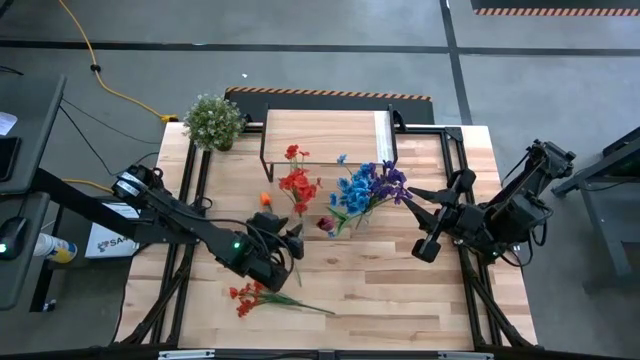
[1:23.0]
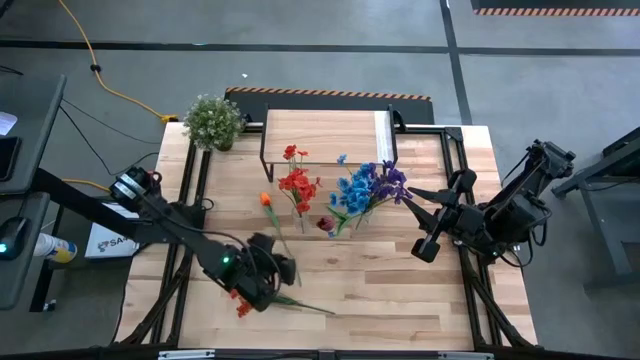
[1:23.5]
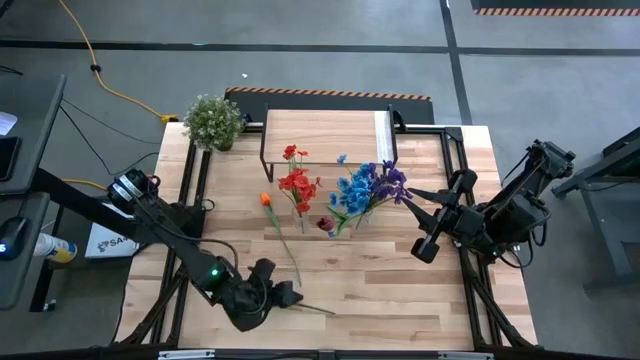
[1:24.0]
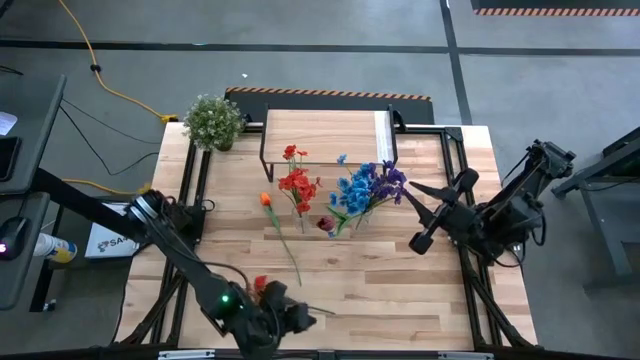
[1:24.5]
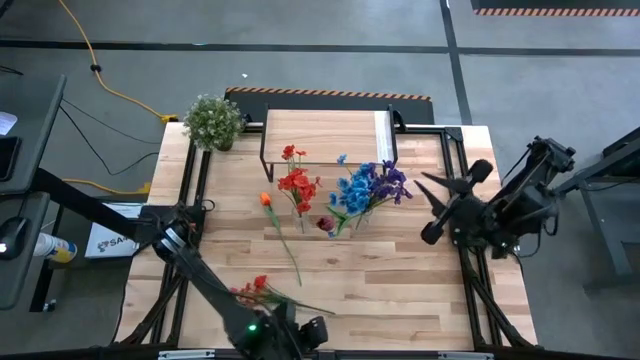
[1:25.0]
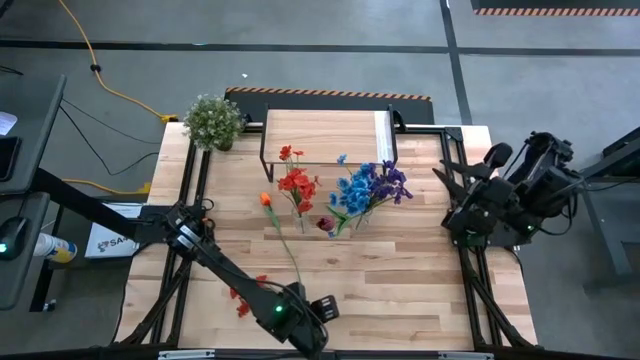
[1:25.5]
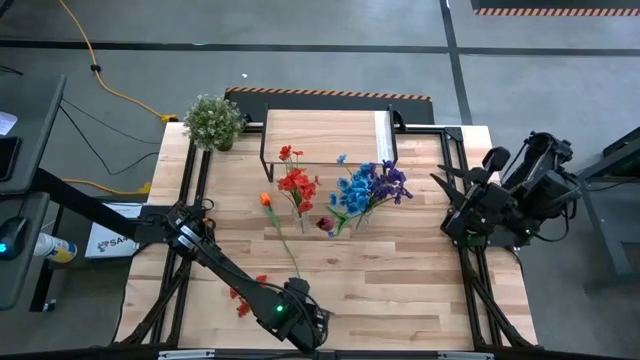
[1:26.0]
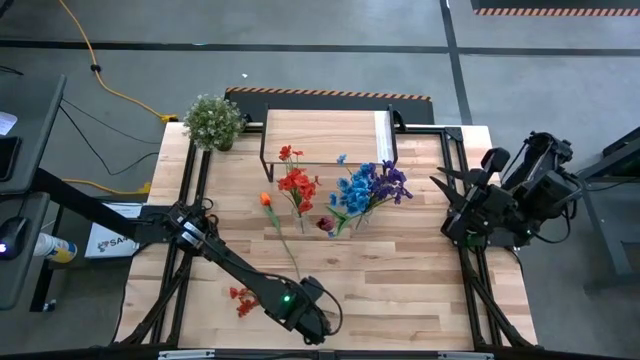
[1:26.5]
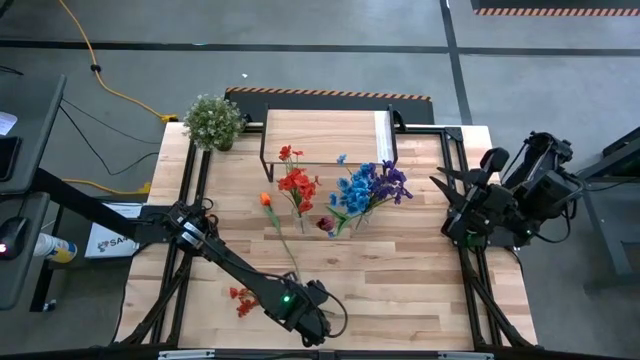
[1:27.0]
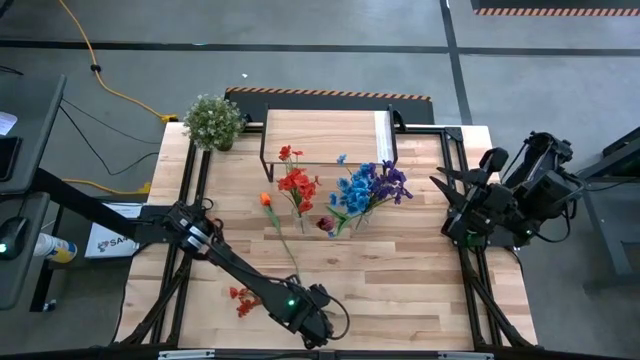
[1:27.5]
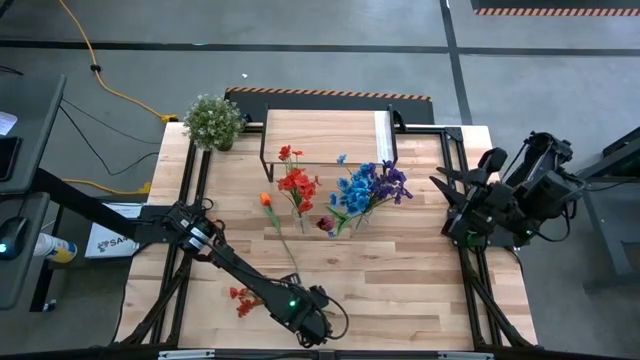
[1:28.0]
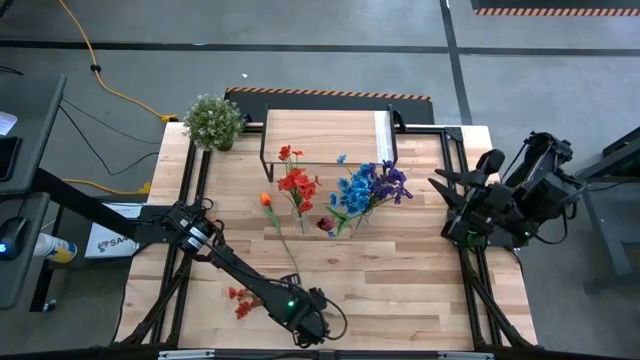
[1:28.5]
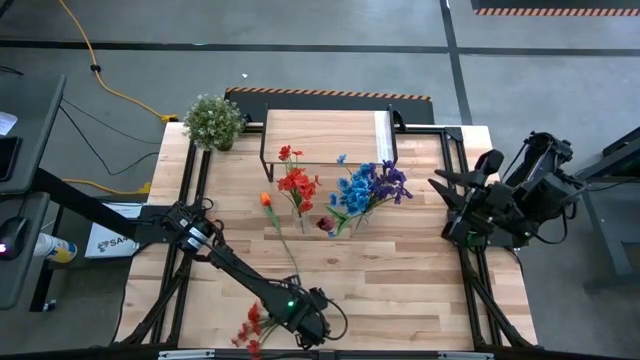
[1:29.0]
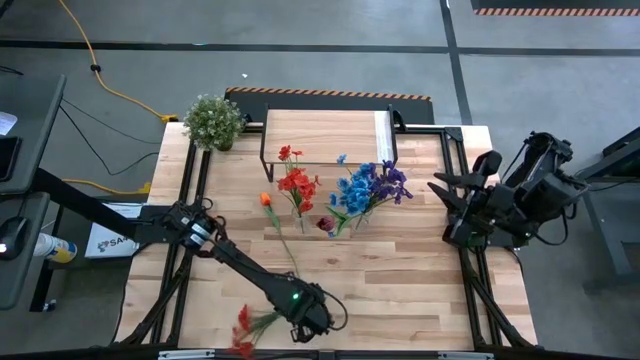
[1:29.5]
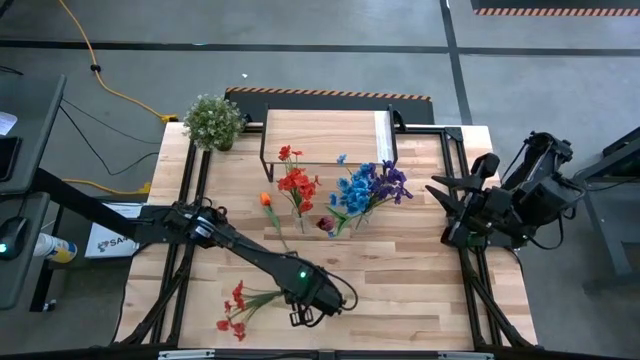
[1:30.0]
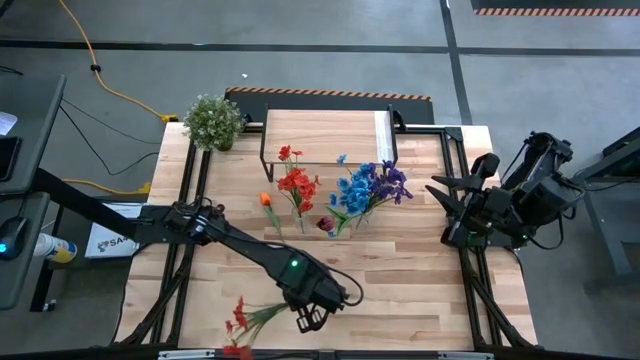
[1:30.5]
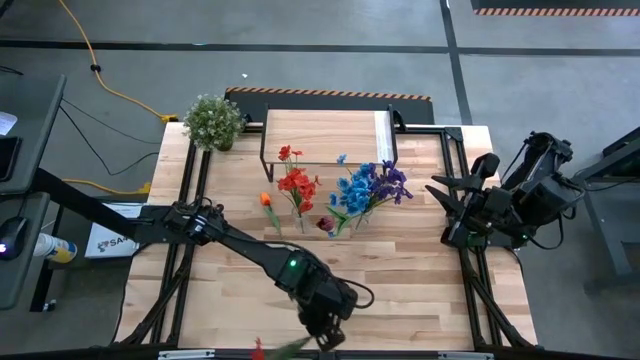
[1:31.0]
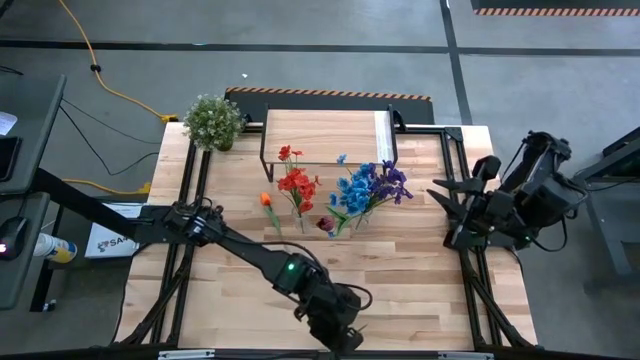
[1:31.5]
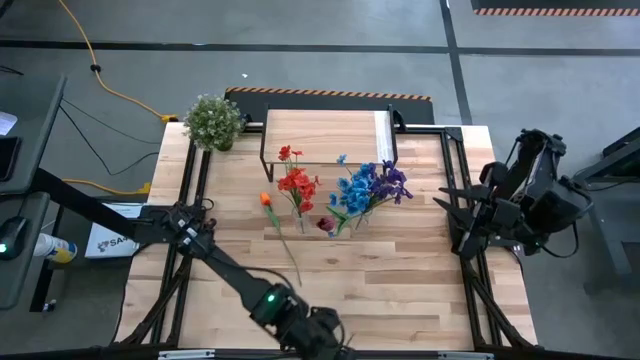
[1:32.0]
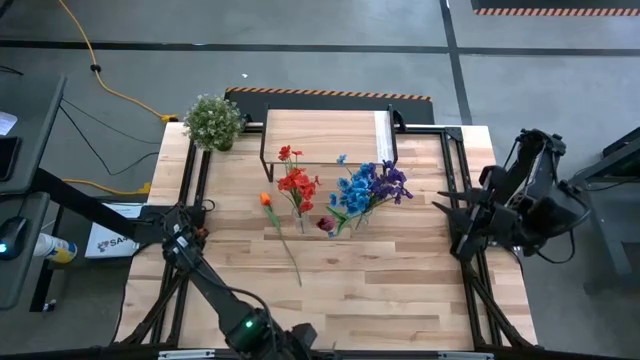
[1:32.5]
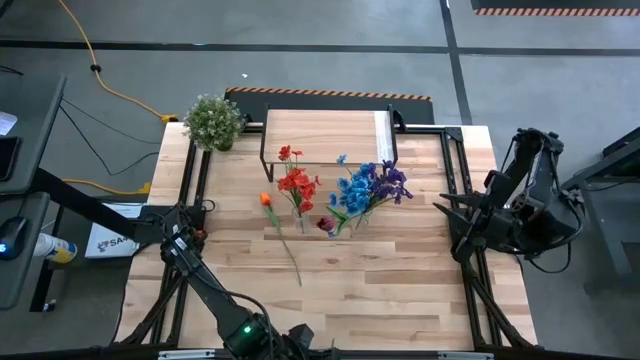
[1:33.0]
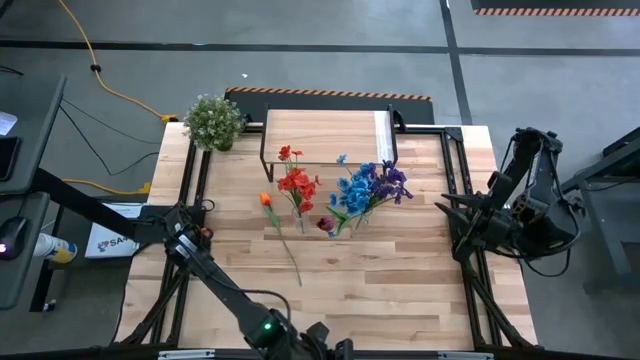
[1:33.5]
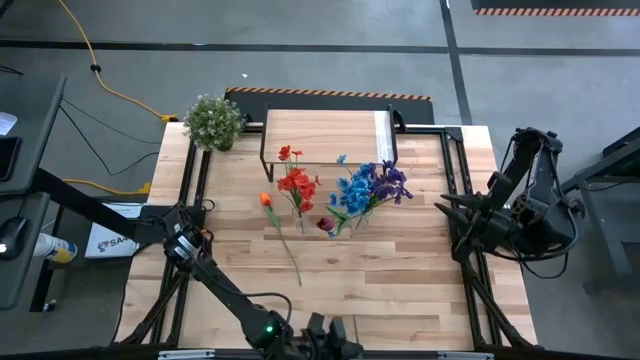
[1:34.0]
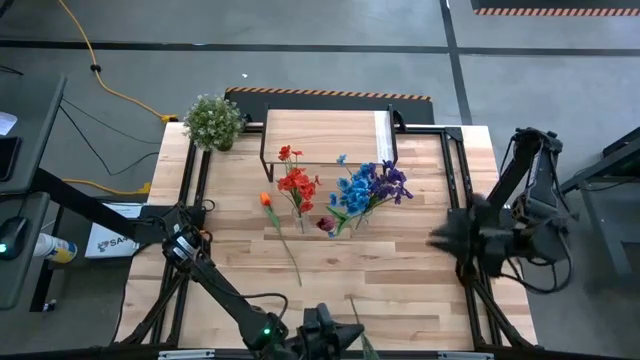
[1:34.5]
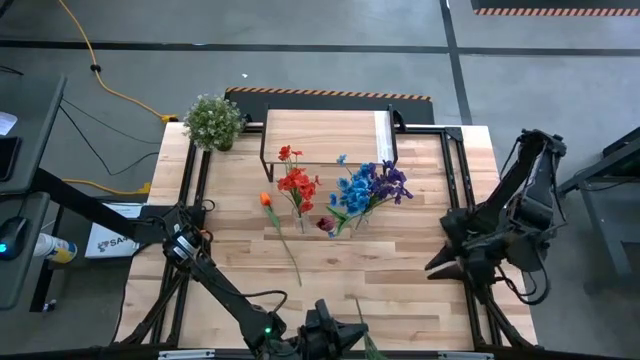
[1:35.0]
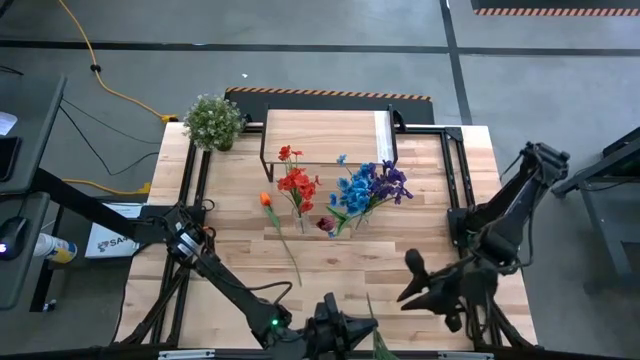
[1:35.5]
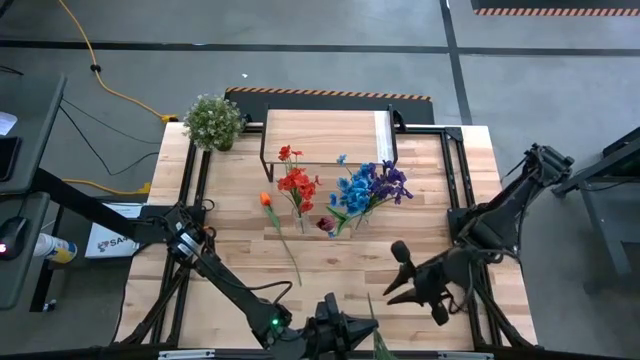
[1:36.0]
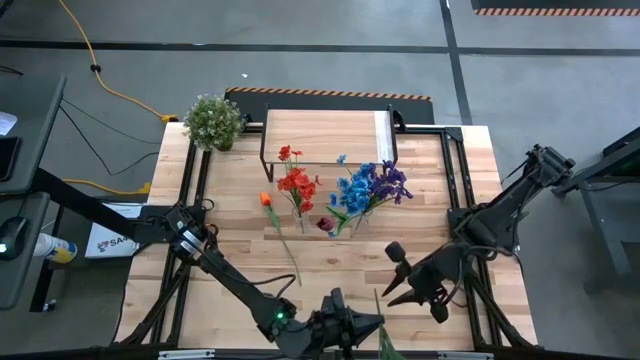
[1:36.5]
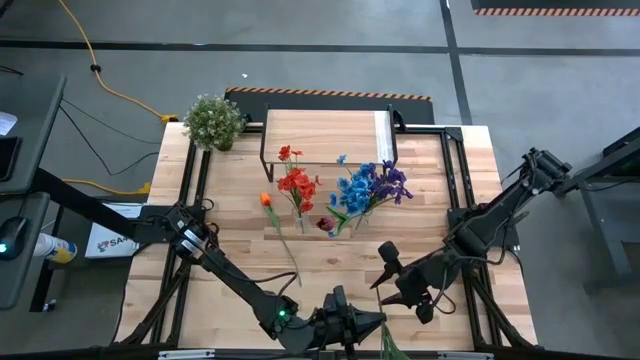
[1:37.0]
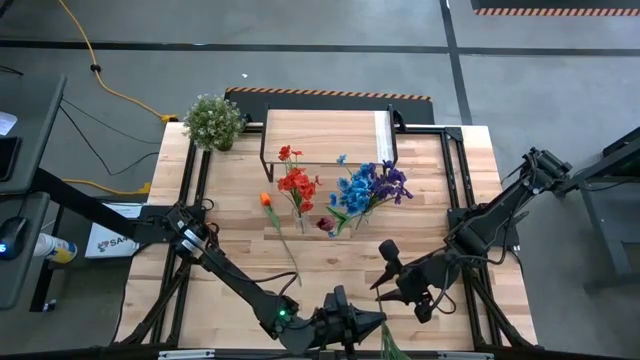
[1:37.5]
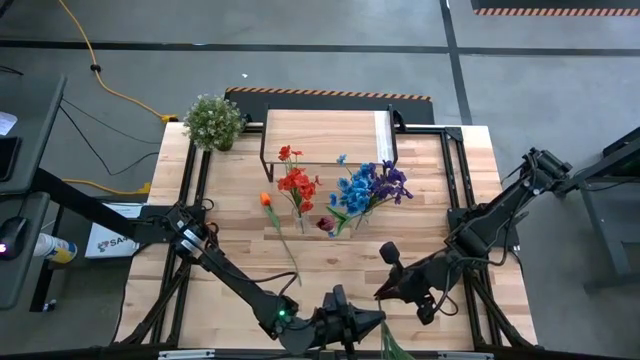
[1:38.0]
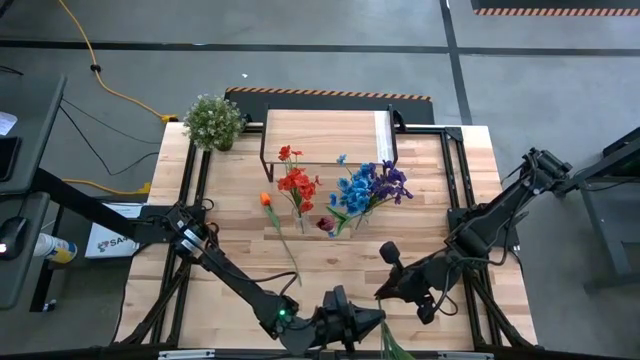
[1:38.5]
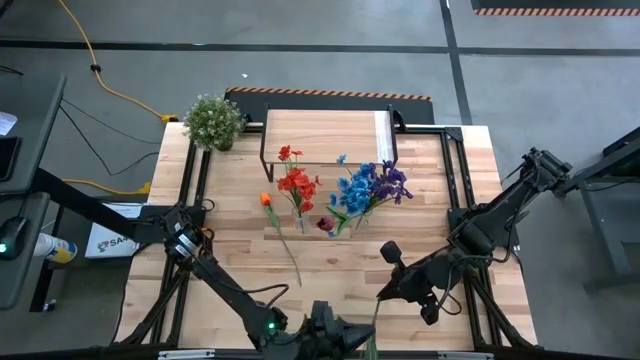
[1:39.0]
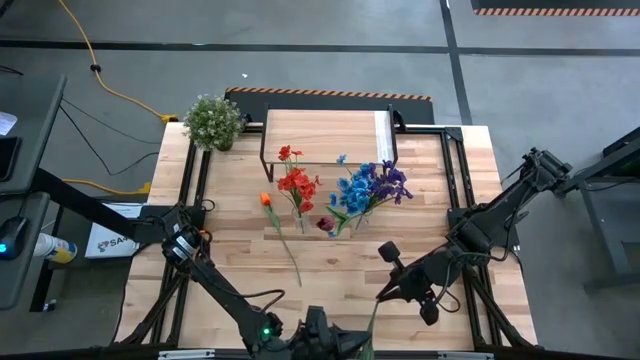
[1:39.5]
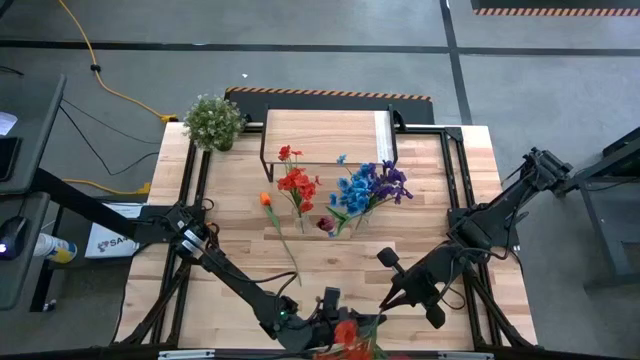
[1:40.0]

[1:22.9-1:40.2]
Task: Pick and place flowers into a vace then onto a shelf
Put the red flowers into the left transparent vase

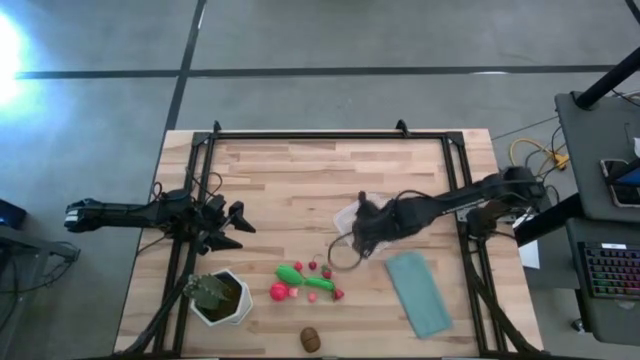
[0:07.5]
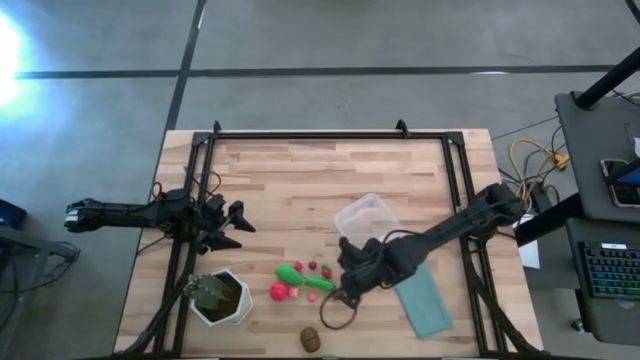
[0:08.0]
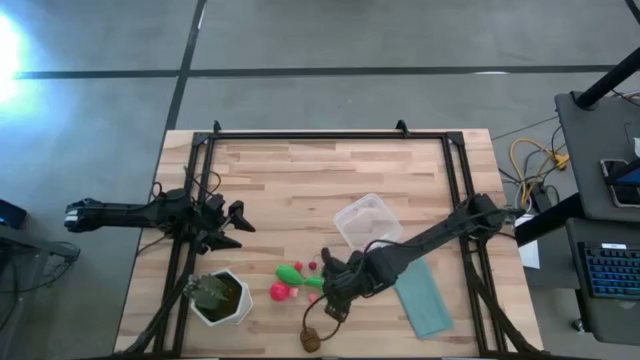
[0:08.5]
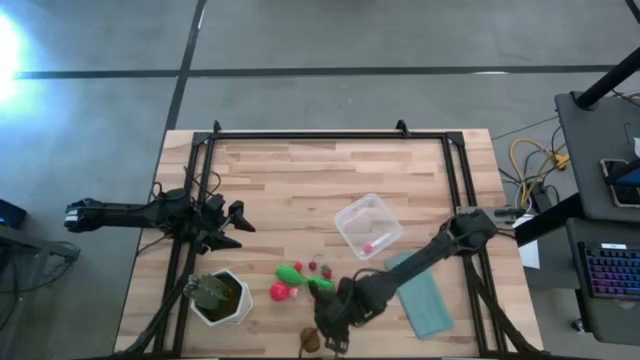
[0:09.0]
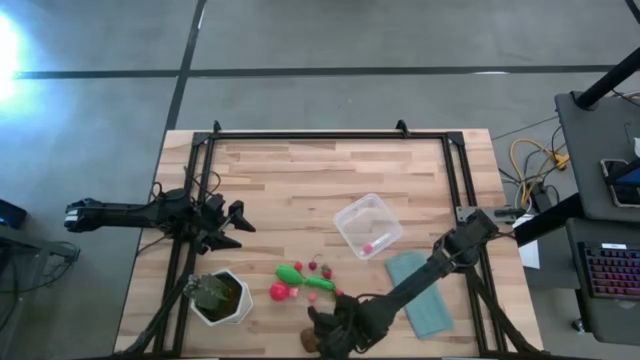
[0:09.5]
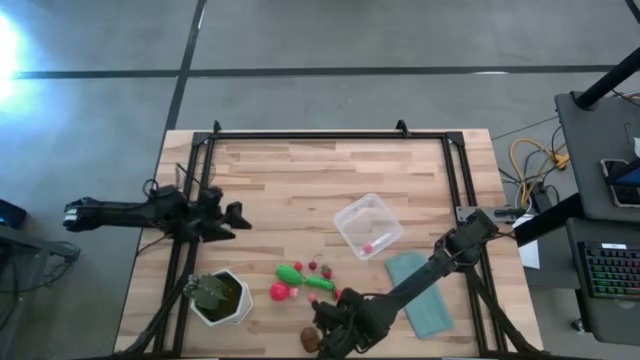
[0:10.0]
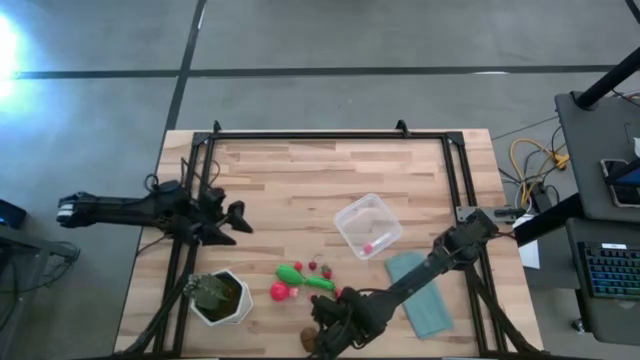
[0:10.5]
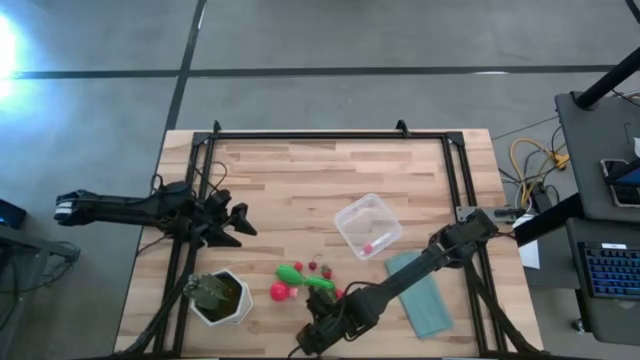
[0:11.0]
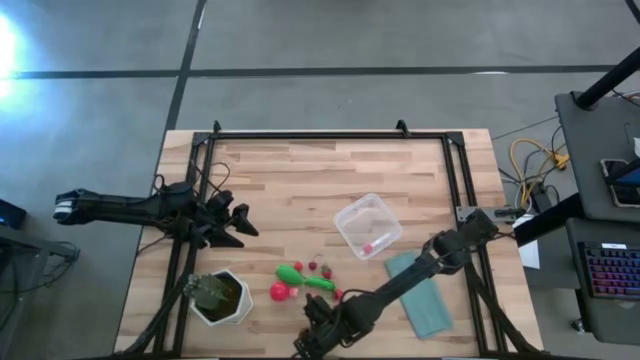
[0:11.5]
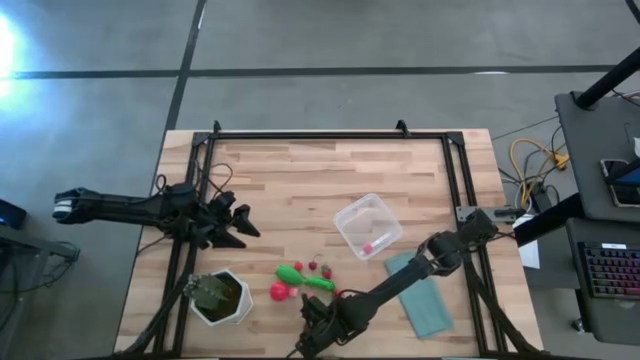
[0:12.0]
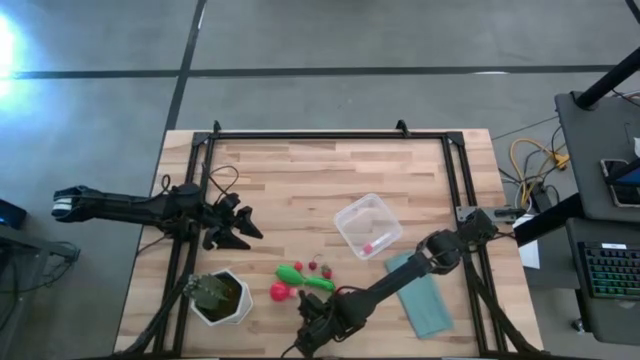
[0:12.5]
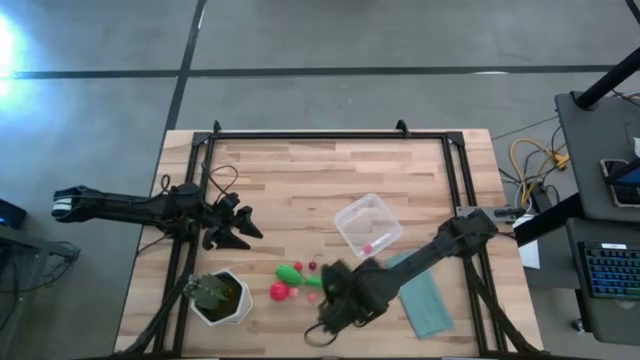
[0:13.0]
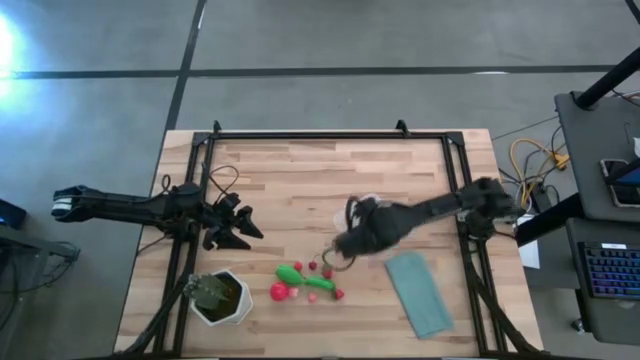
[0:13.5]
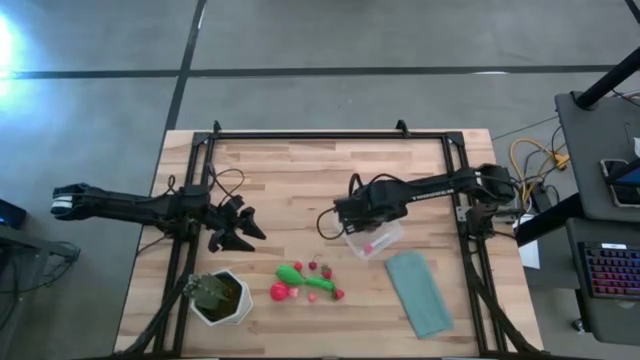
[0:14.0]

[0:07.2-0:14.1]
Task: Pick and placing Produce into tupperware
Put the brown kiwi into the transparent bin
